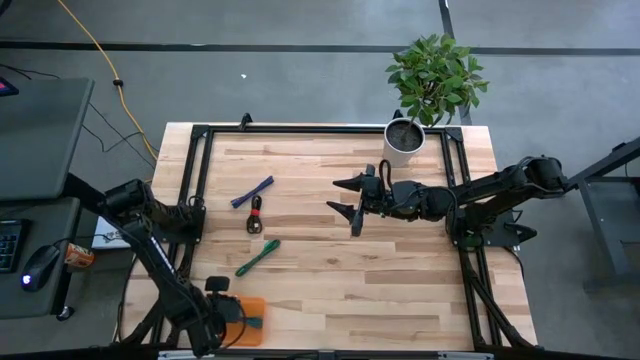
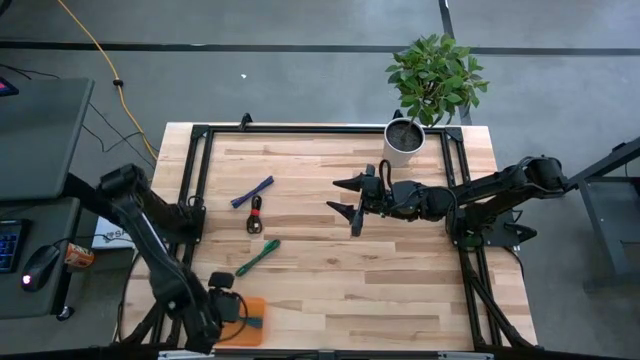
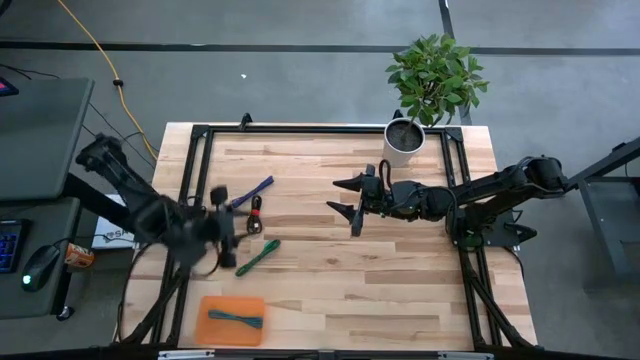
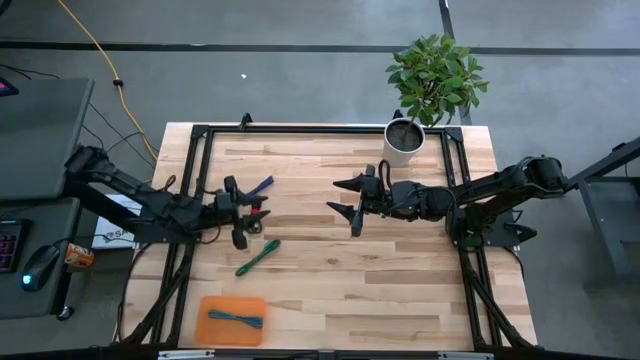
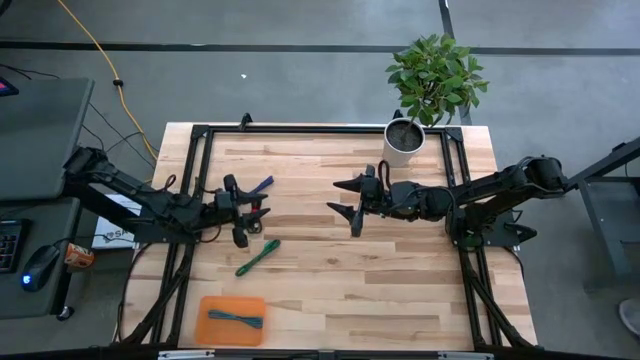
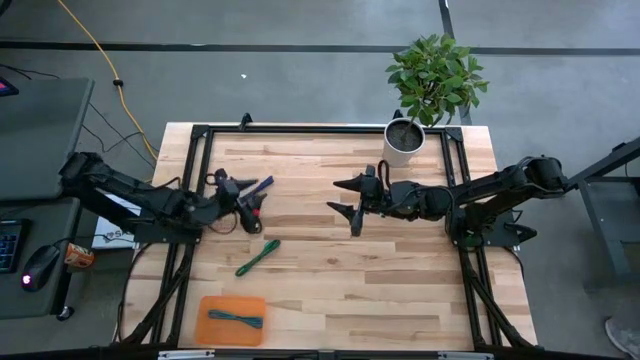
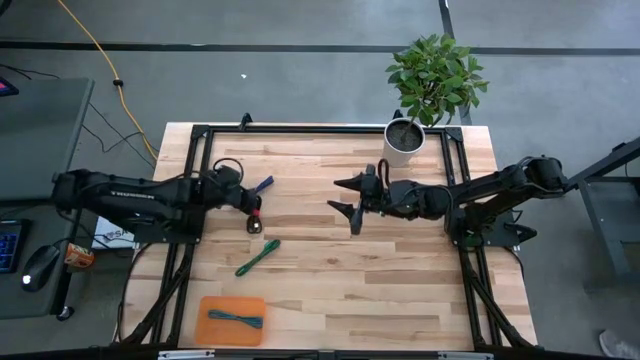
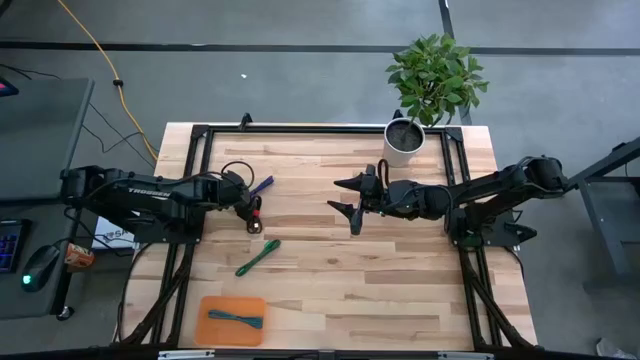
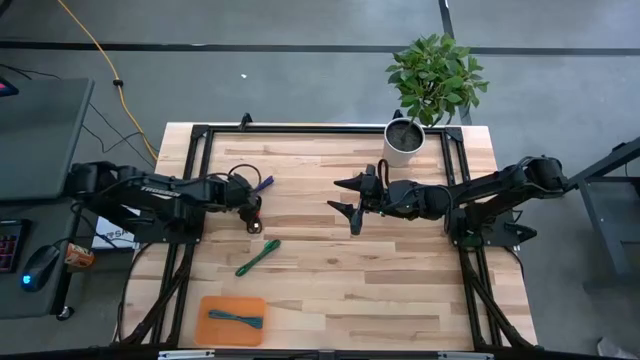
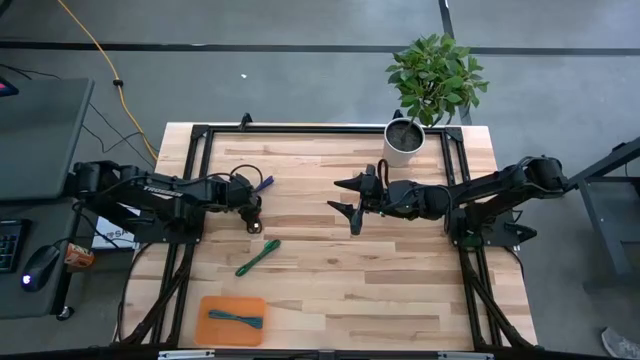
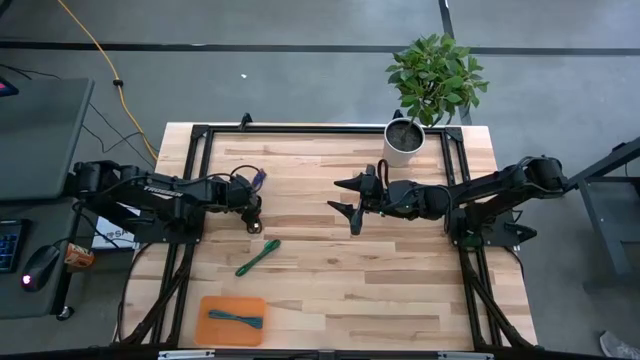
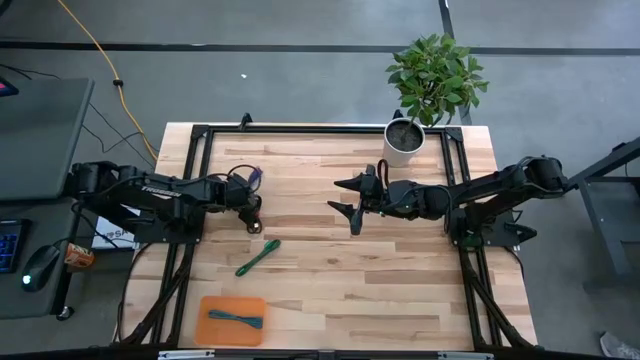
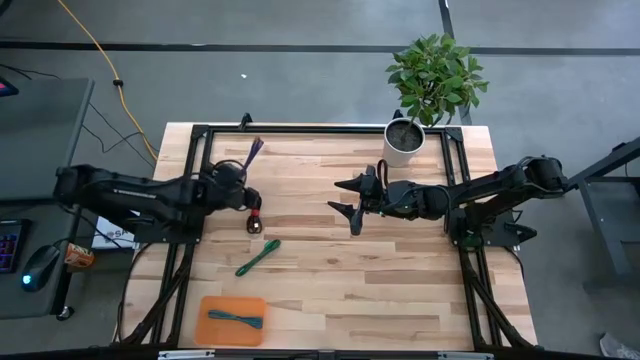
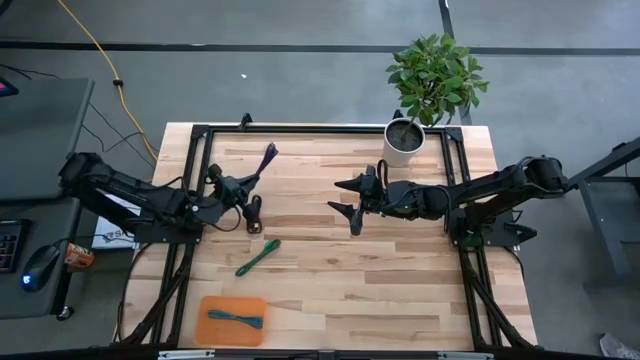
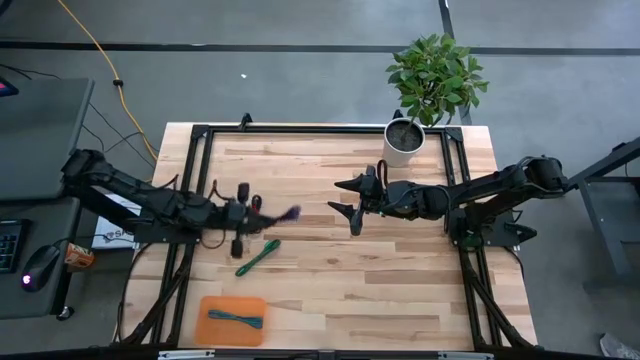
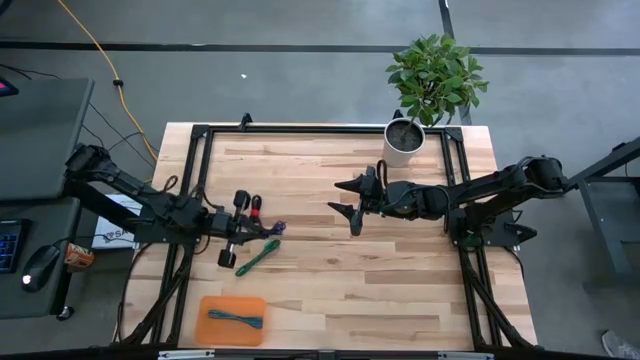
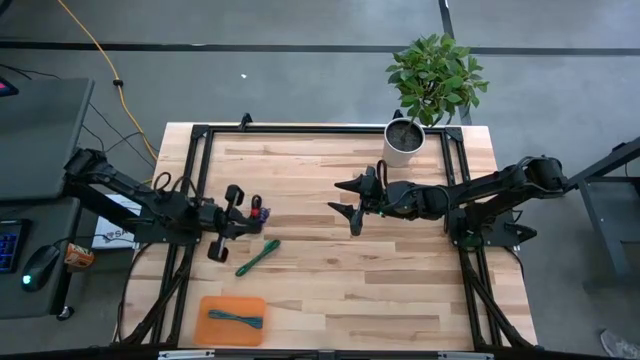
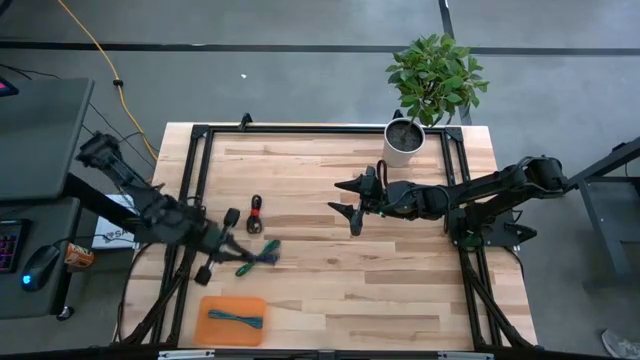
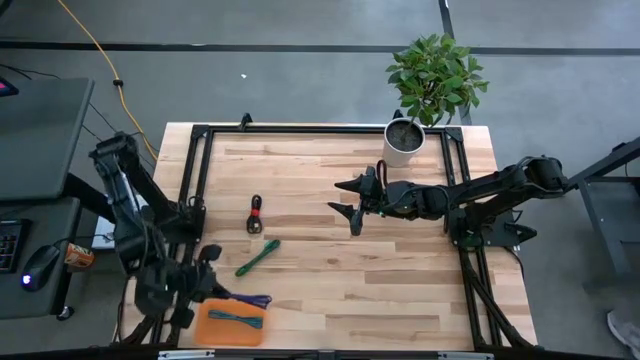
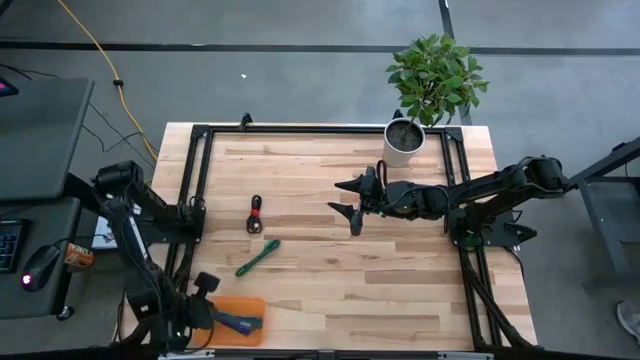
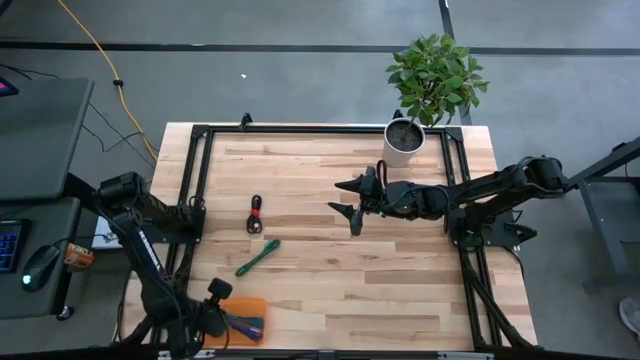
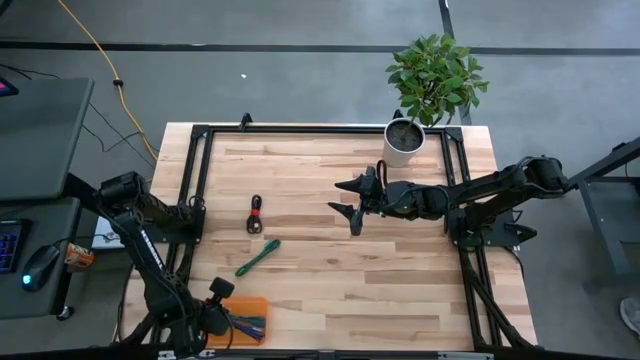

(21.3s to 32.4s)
Task: Pick and place USB-C Cables
Put the violet charger cable into the orange bin

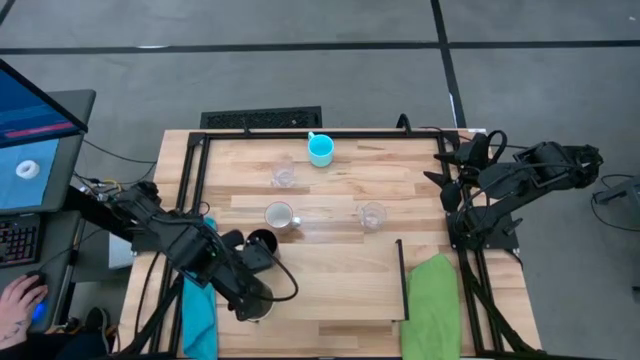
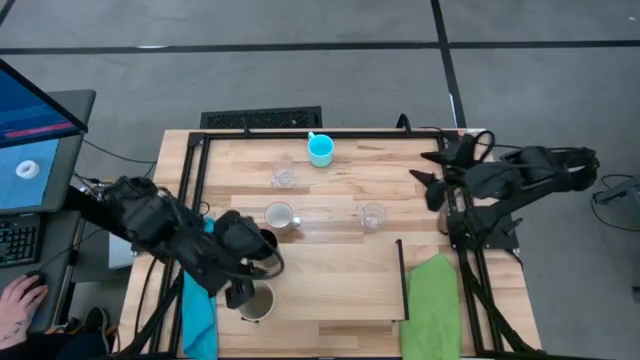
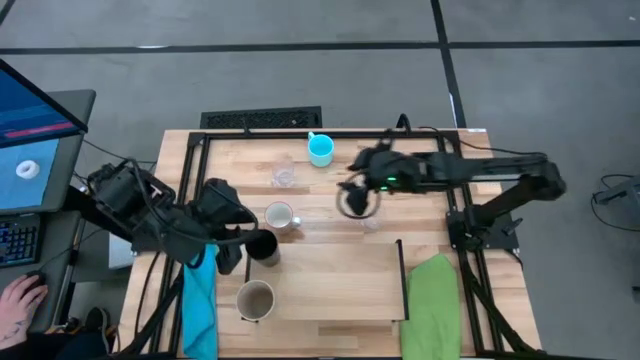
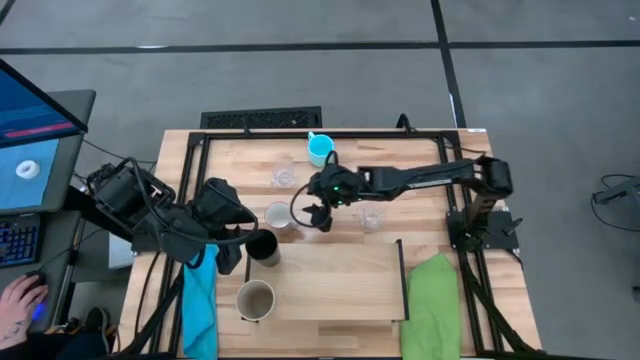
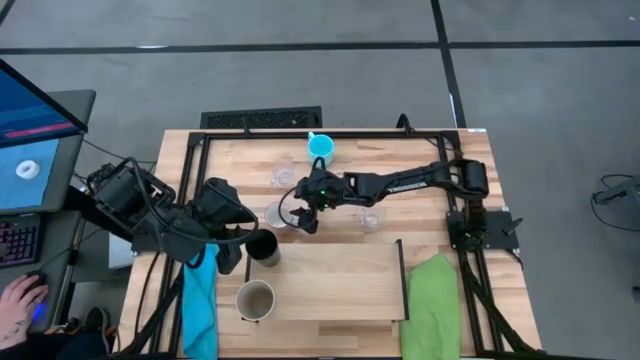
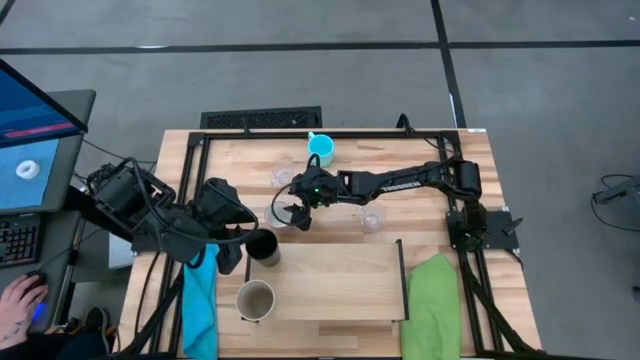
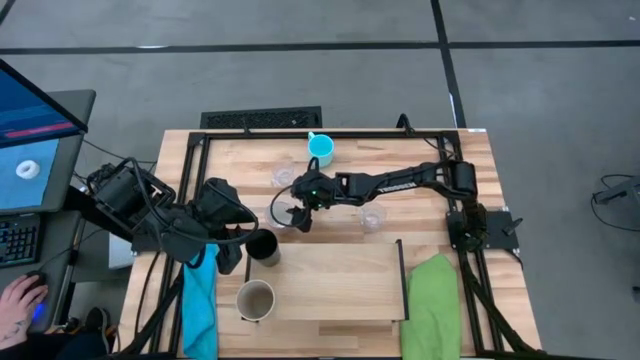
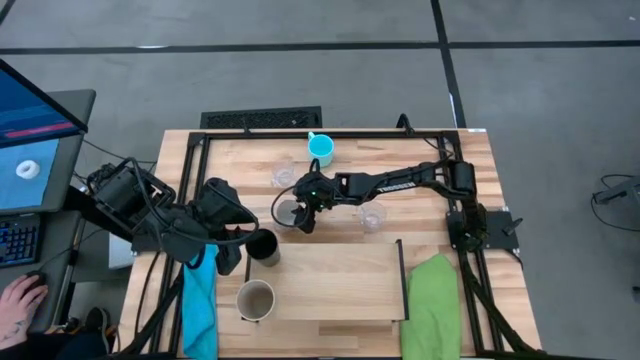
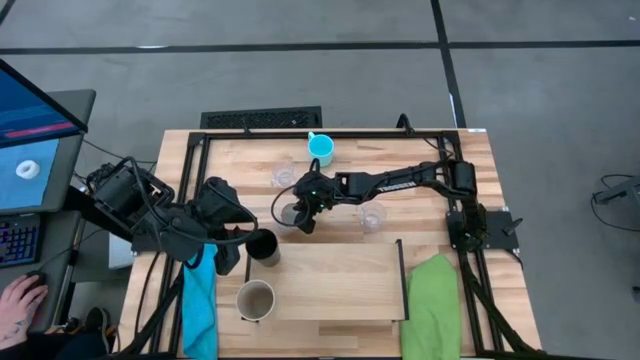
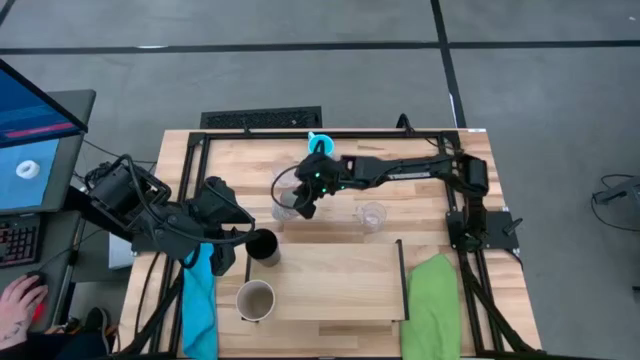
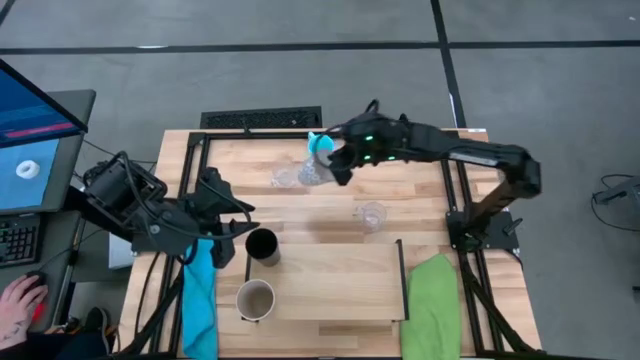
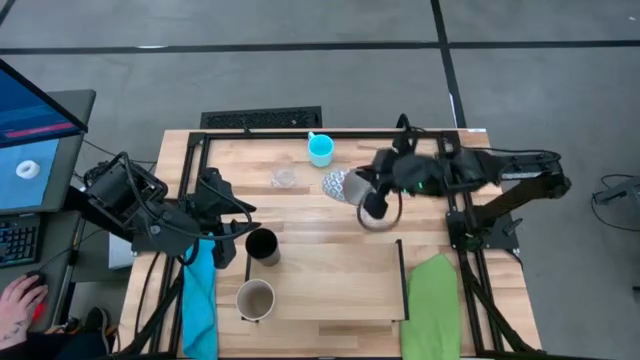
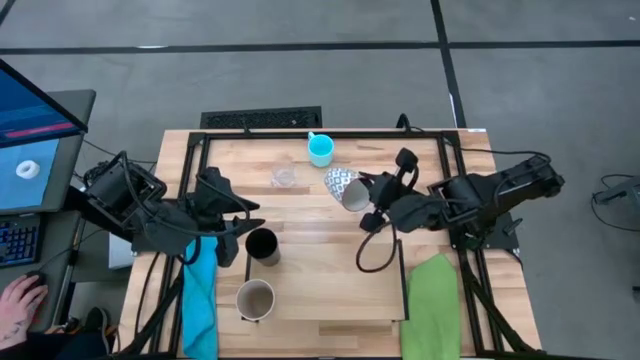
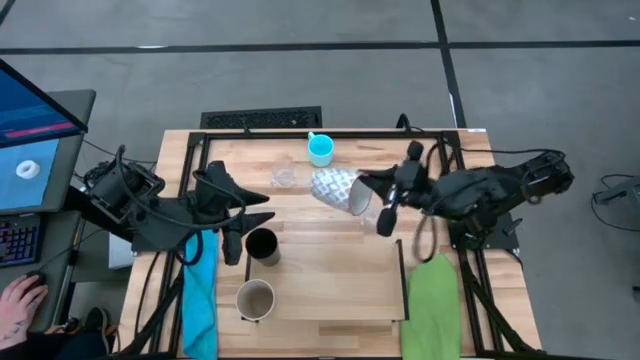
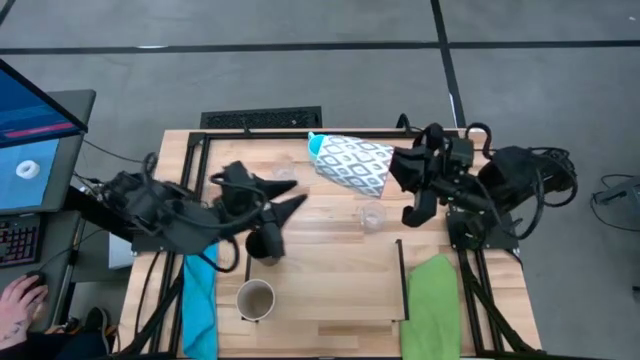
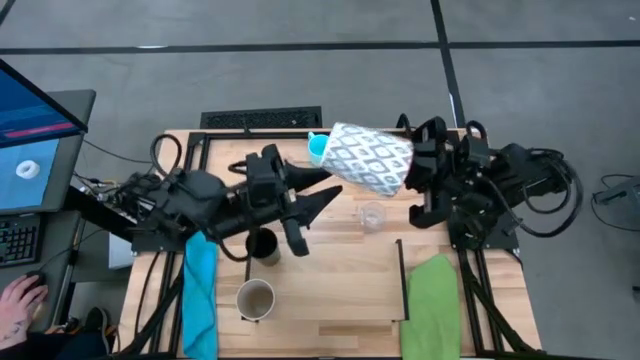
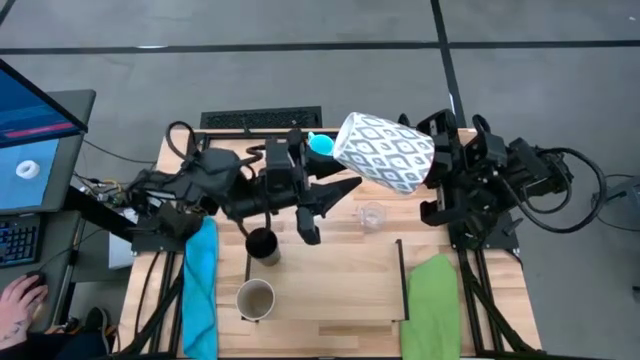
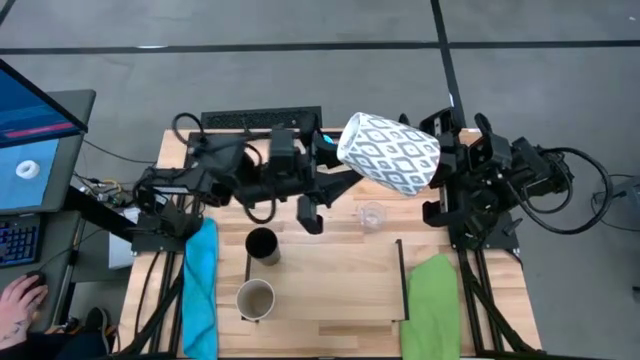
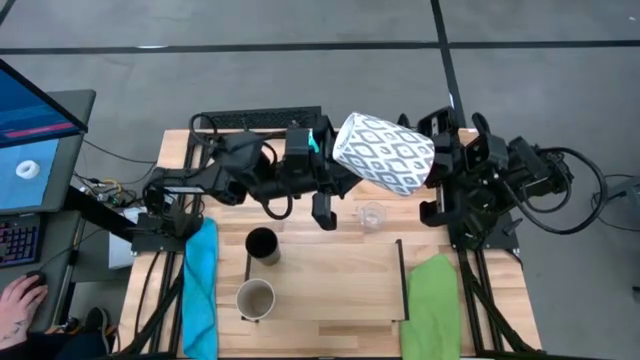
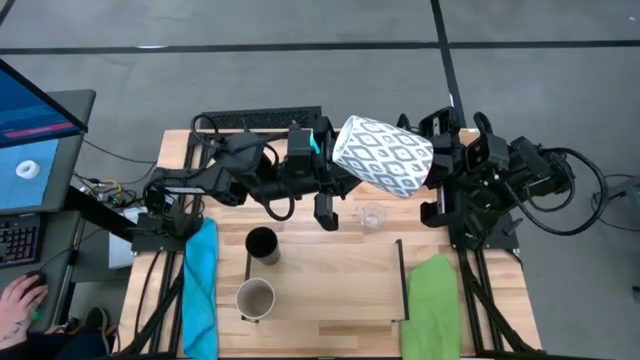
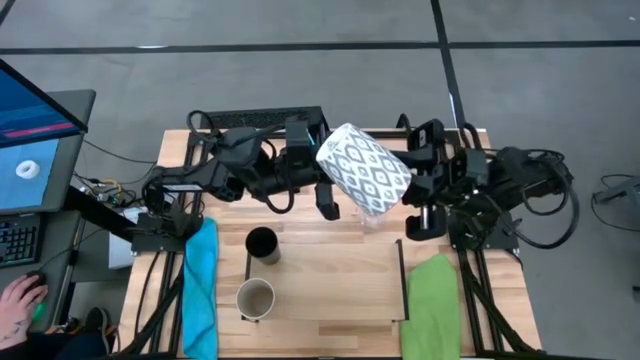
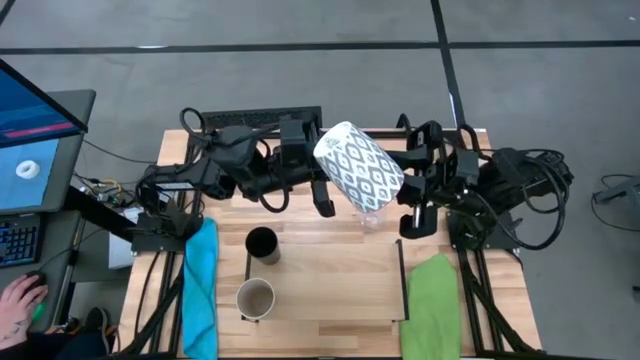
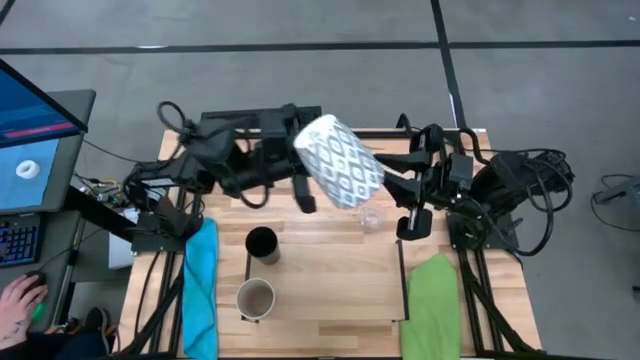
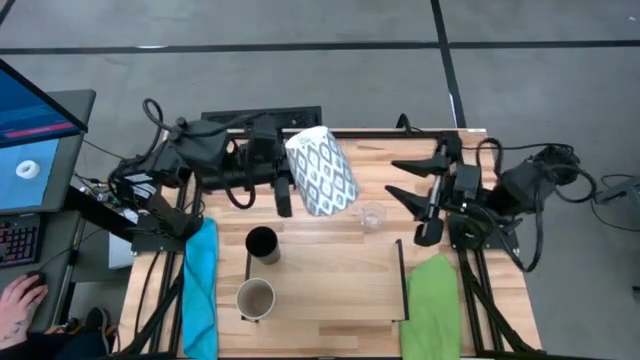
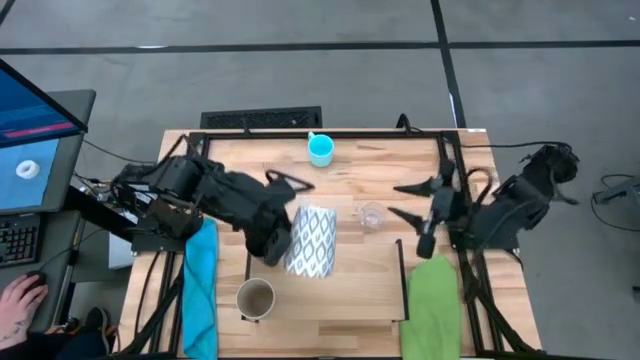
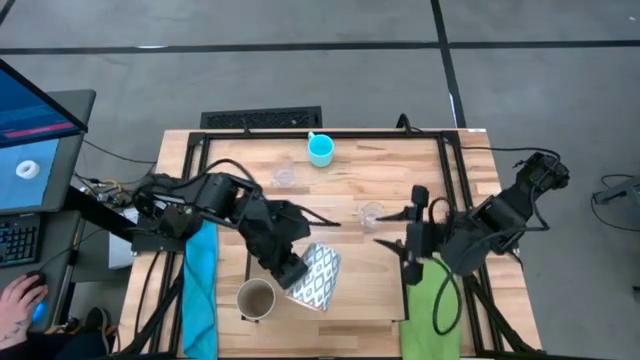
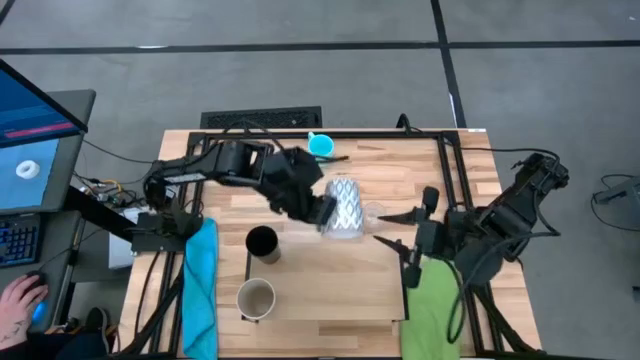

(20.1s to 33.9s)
Task: Stack small to large cups/mugs on shelf
Put the gray patterned mug on the shelf
